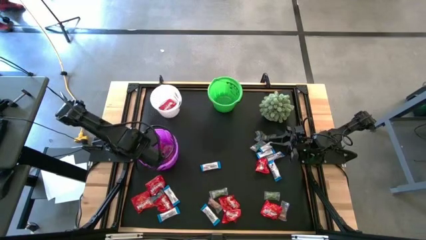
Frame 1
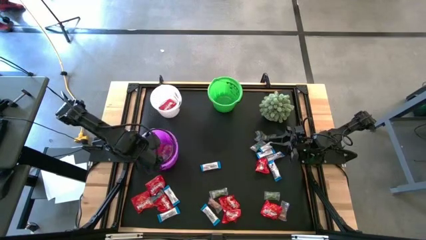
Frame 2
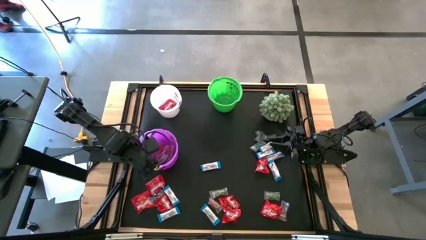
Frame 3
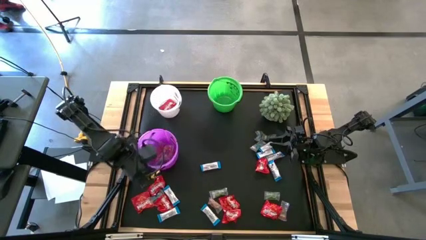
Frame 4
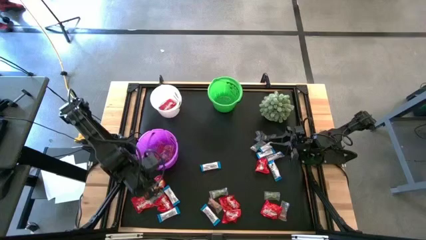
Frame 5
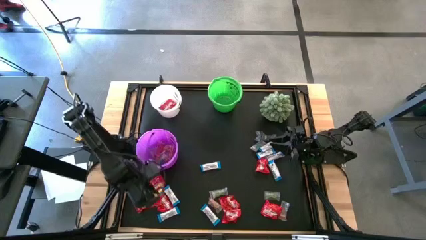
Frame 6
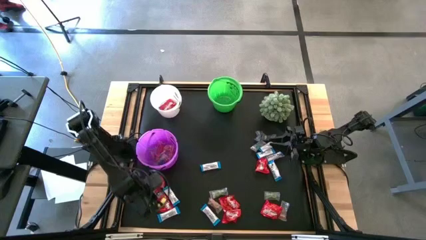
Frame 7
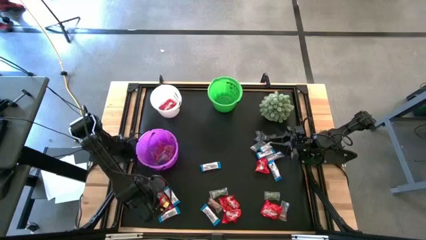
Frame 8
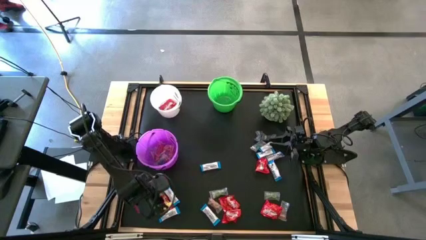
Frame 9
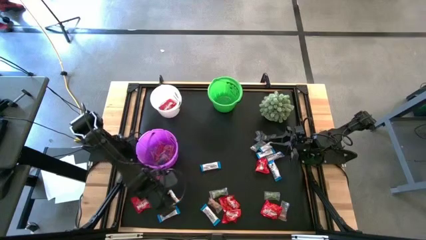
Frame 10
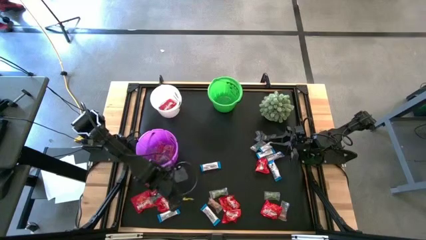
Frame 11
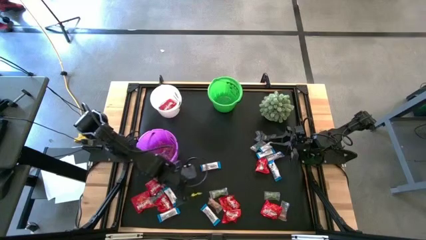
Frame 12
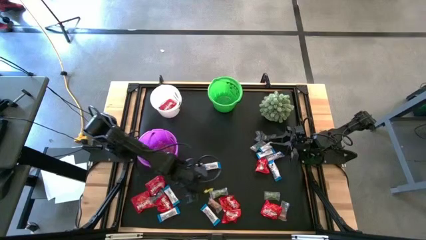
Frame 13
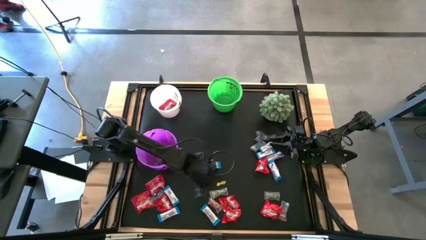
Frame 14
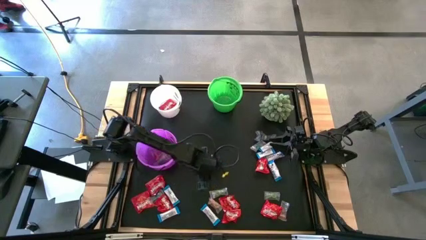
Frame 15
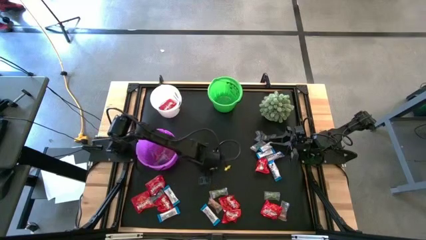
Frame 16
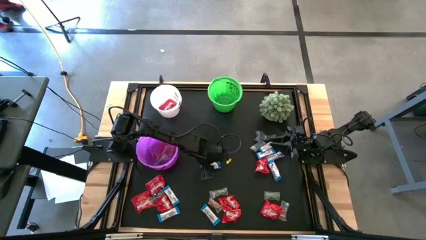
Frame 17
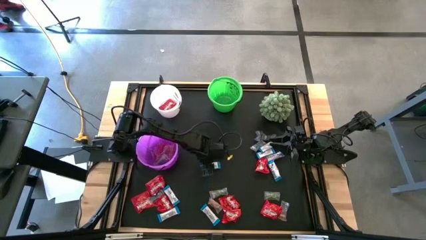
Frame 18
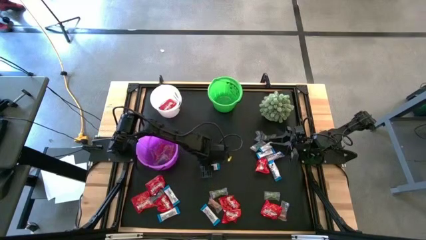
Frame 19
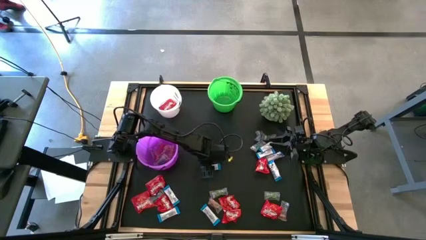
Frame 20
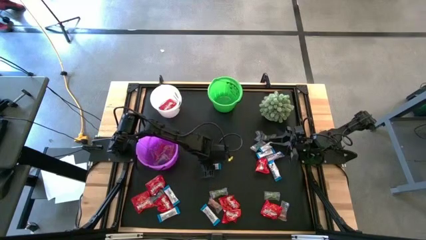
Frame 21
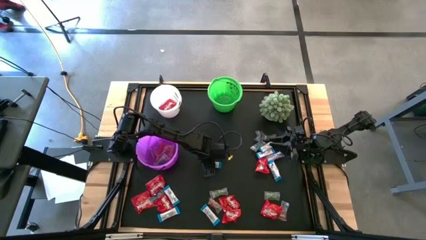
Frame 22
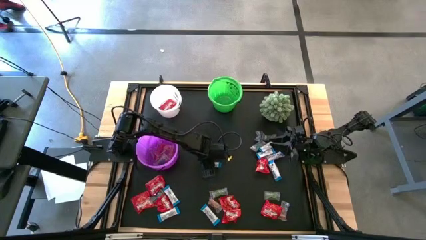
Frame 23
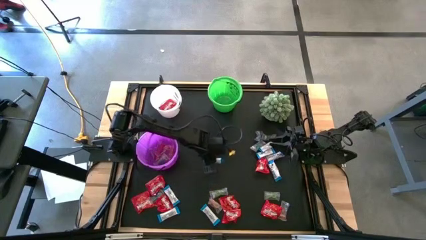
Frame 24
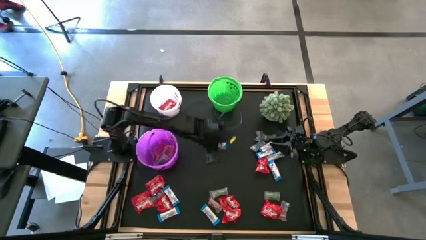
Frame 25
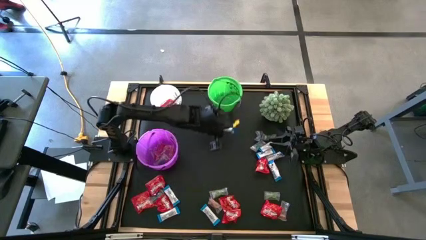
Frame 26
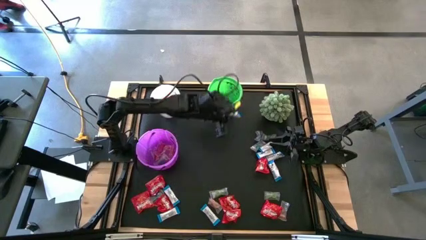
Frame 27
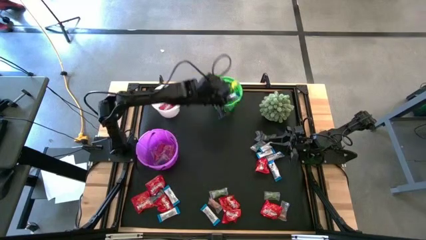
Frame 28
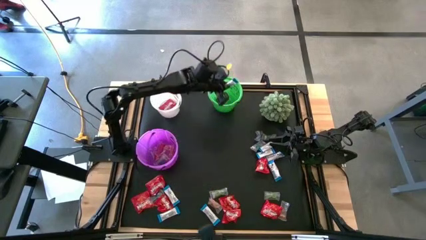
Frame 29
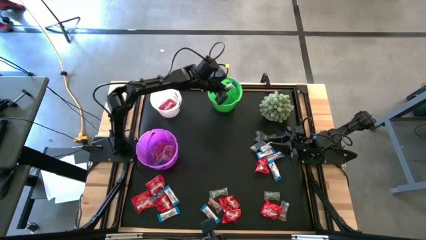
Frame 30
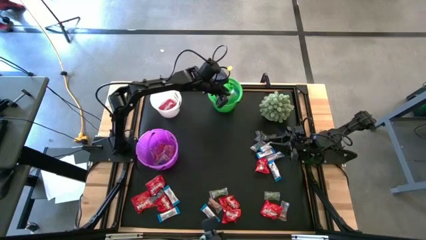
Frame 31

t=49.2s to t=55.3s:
Task: Sort candy
Put the white chocolate into the green bucket

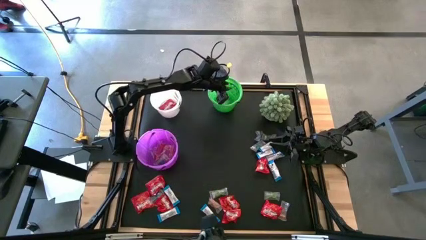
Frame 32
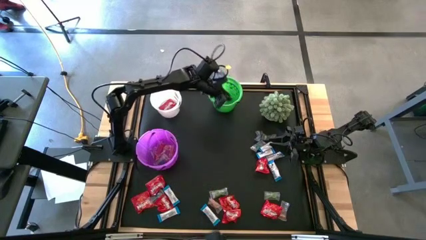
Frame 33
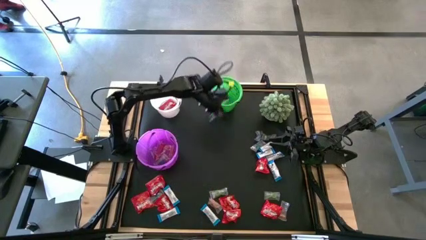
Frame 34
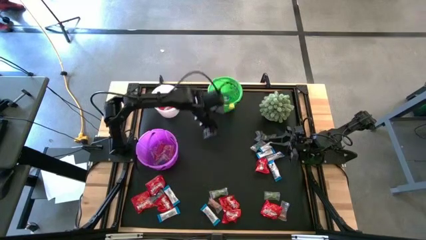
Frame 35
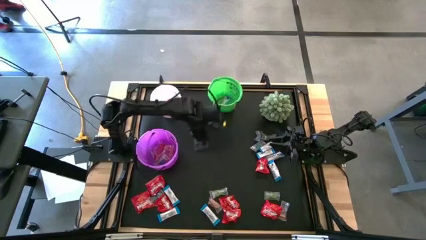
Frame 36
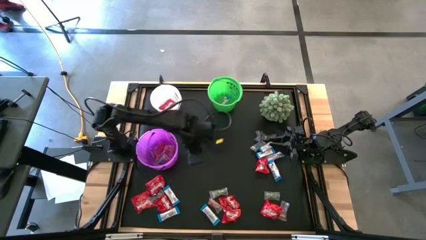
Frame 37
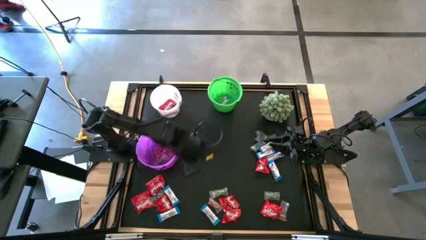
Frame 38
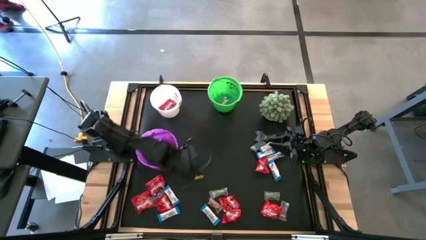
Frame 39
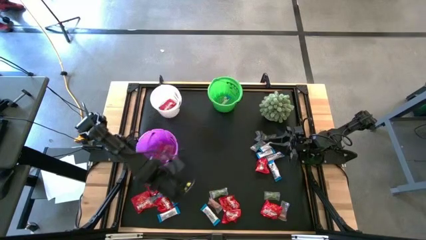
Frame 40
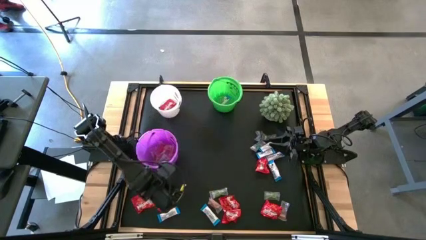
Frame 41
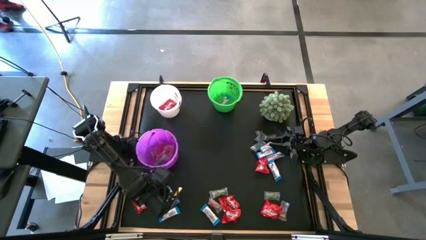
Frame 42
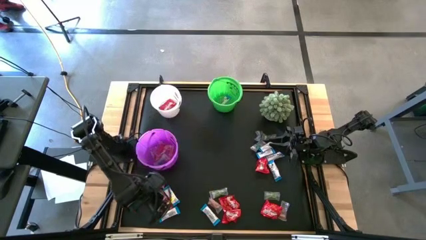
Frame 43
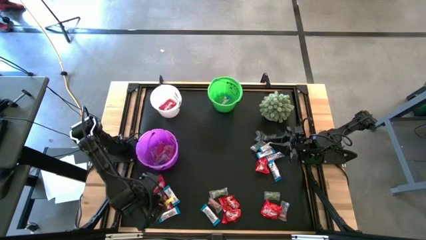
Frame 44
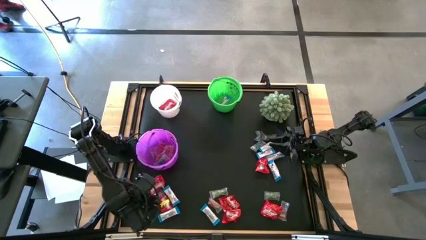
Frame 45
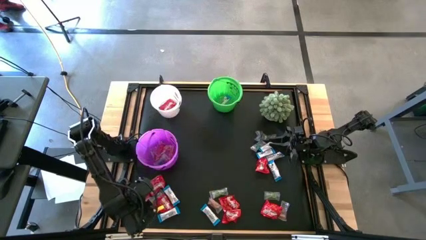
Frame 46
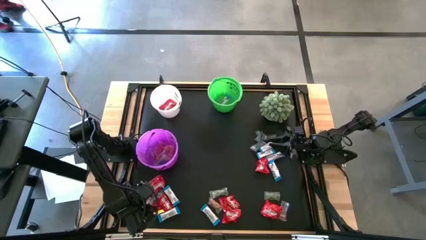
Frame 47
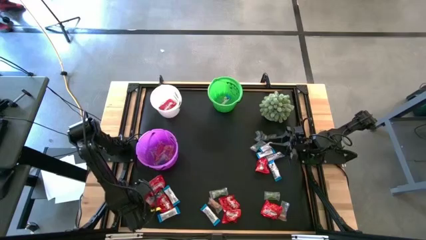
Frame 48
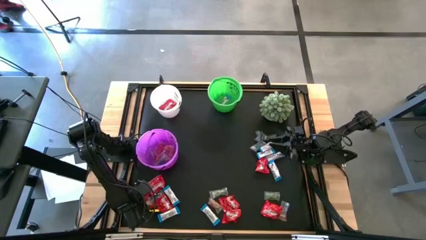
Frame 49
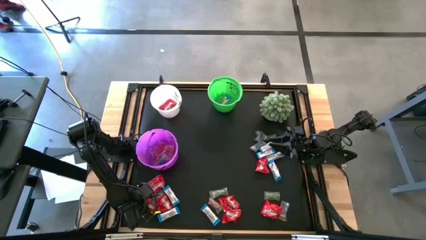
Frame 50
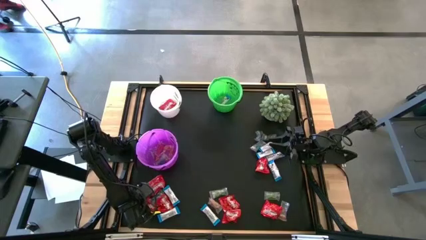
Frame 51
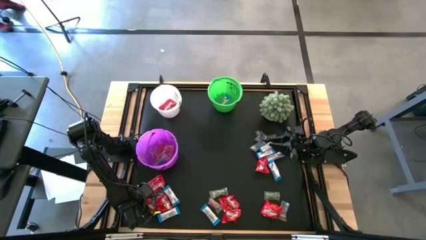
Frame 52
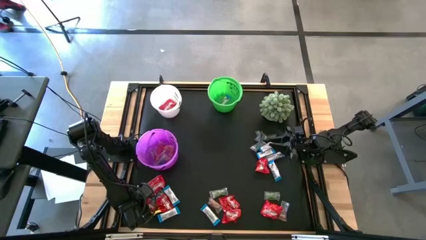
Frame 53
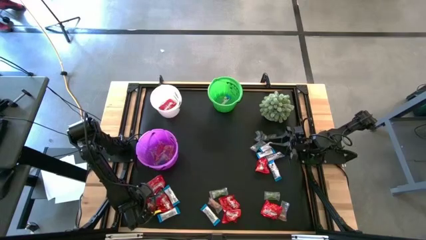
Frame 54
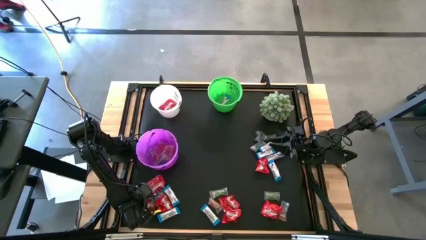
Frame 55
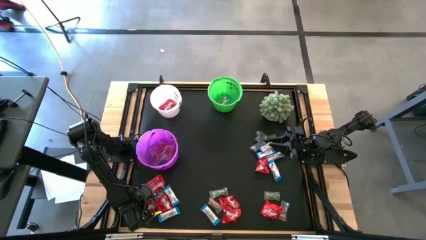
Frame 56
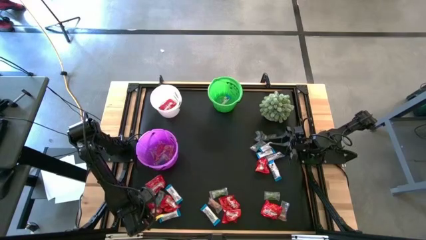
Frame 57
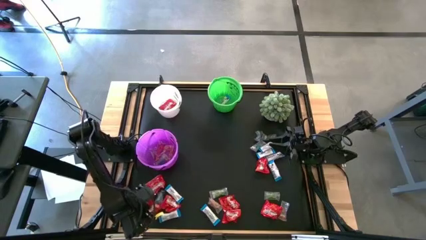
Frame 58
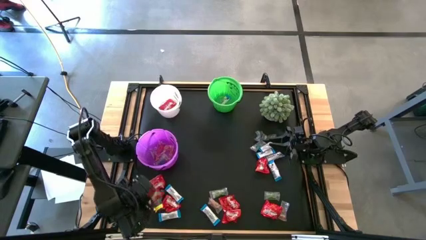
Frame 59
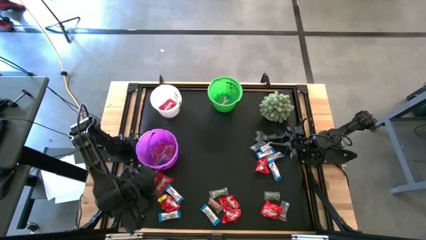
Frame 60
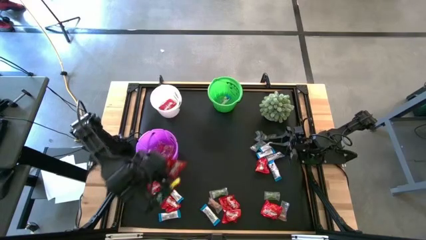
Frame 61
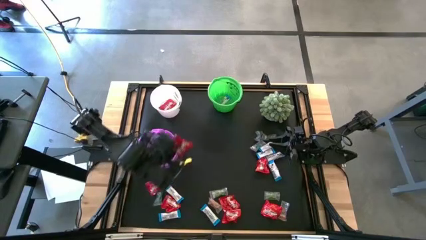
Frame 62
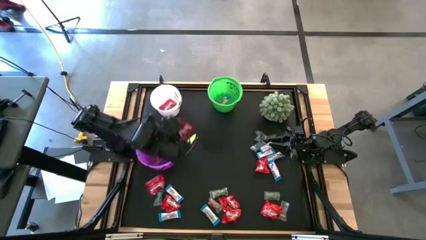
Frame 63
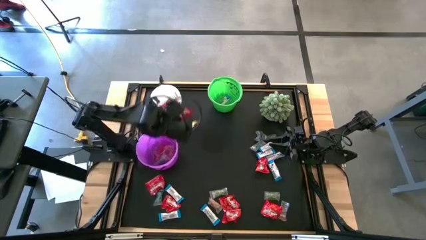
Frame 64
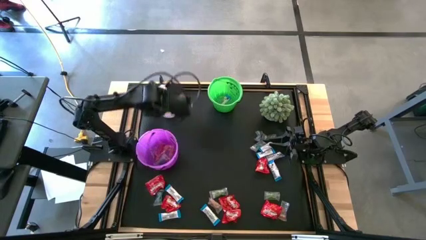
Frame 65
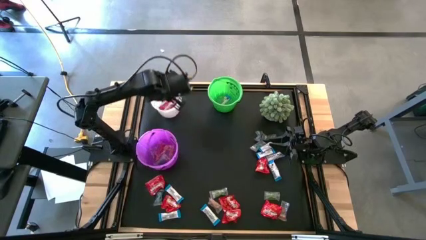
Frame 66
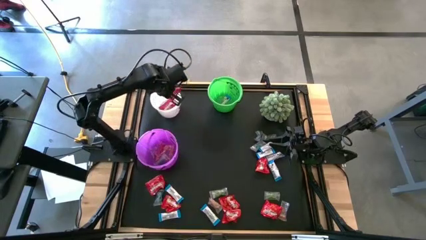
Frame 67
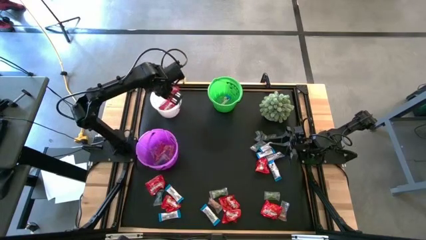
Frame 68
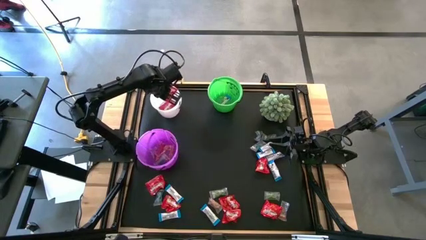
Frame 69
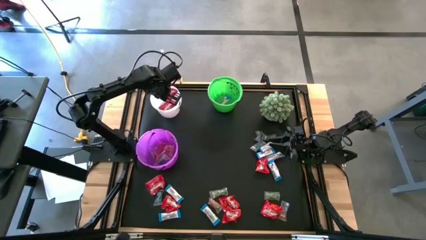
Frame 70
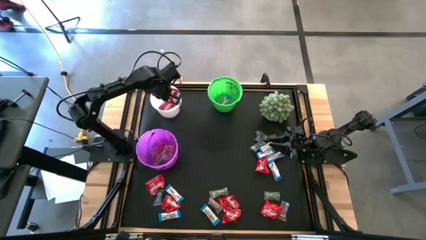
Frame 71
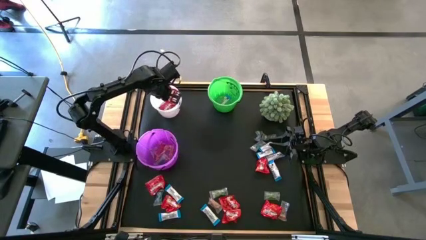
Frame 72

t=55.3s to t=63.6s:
Put the red candy into the white bucket
